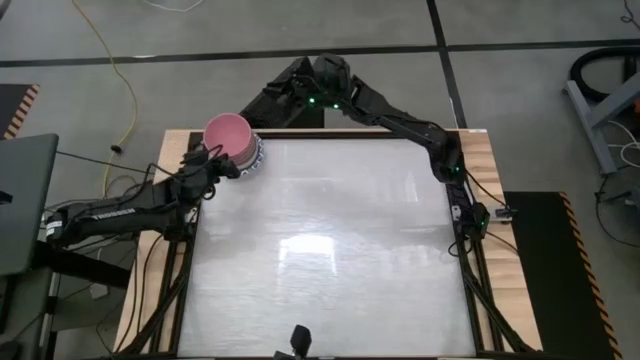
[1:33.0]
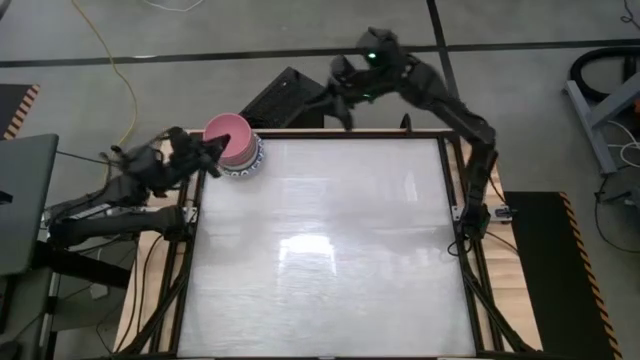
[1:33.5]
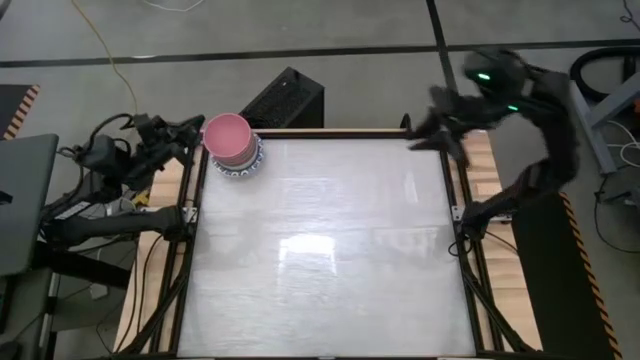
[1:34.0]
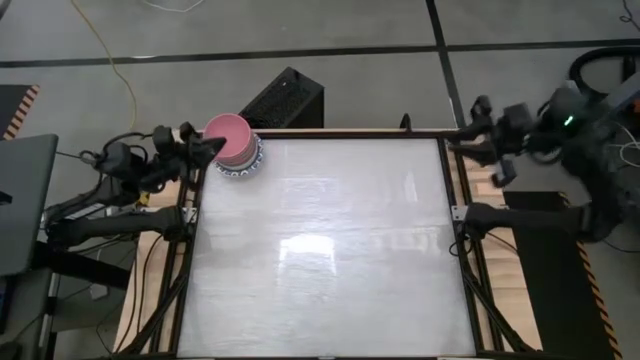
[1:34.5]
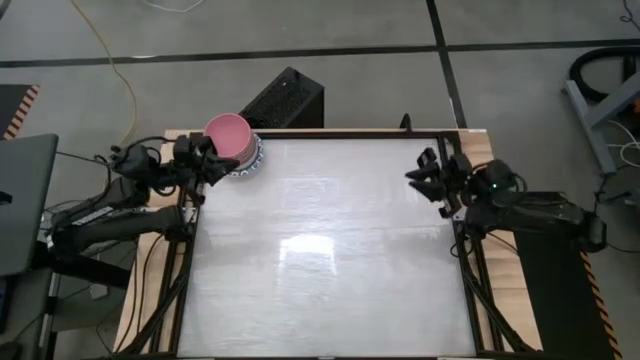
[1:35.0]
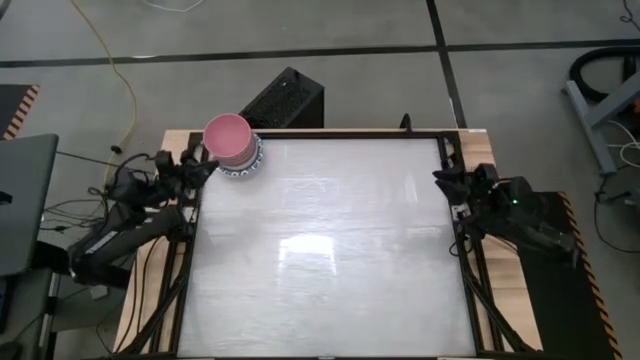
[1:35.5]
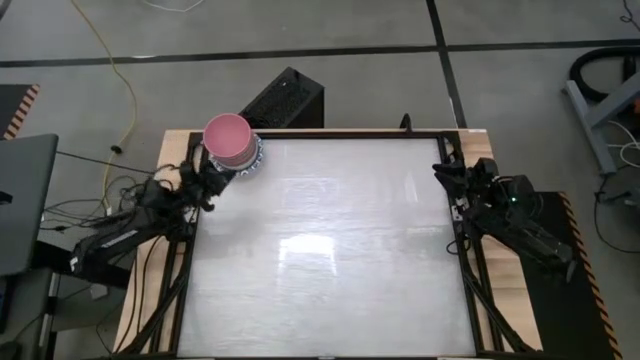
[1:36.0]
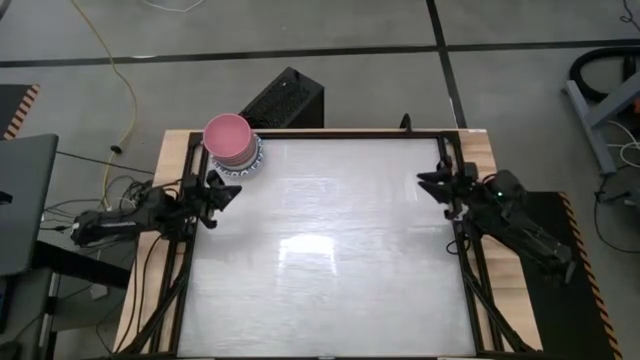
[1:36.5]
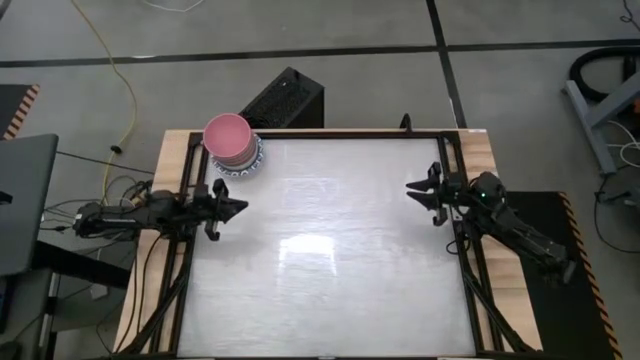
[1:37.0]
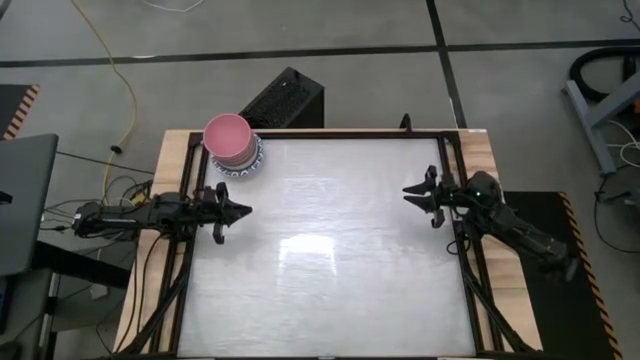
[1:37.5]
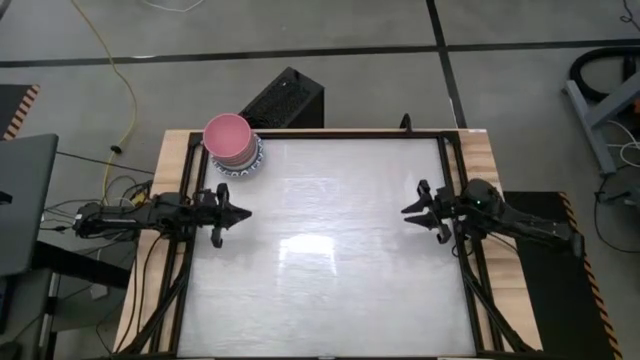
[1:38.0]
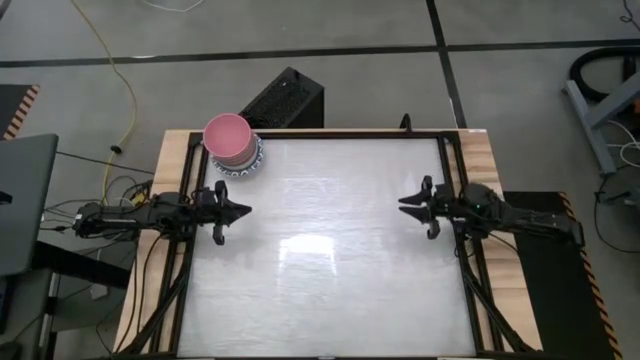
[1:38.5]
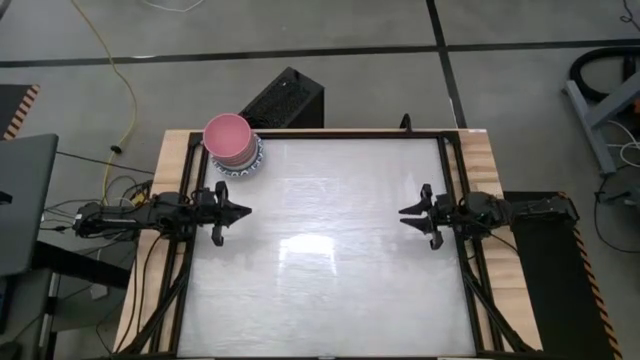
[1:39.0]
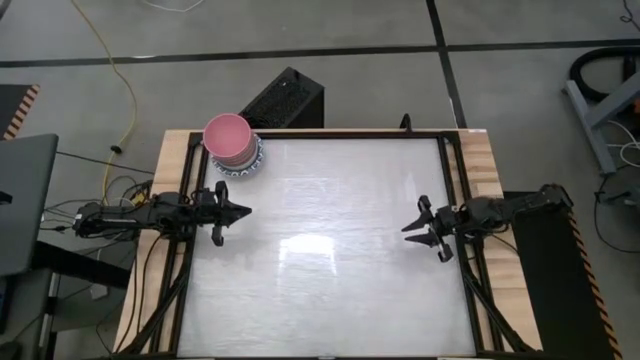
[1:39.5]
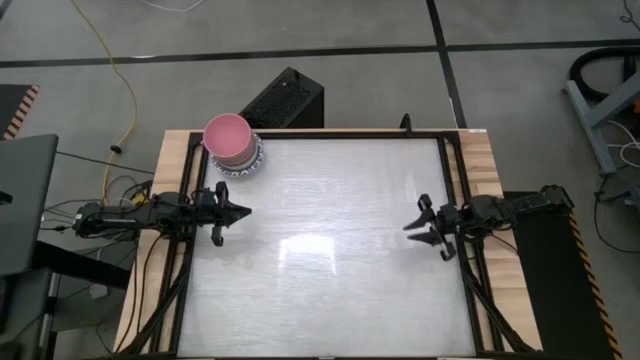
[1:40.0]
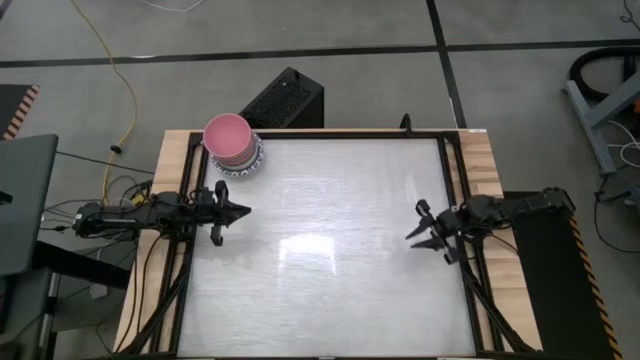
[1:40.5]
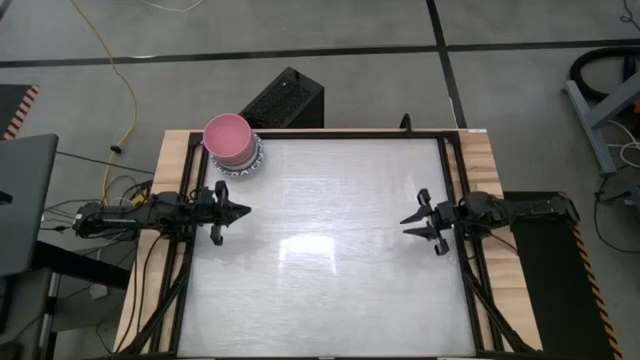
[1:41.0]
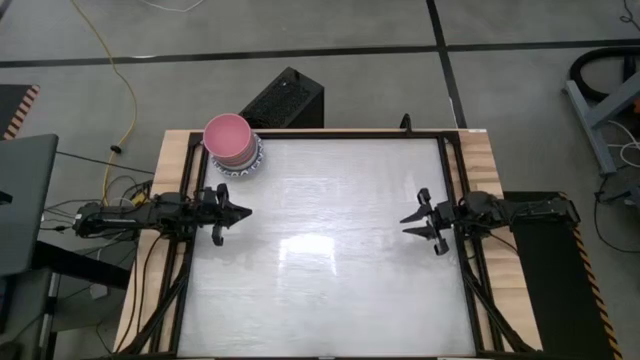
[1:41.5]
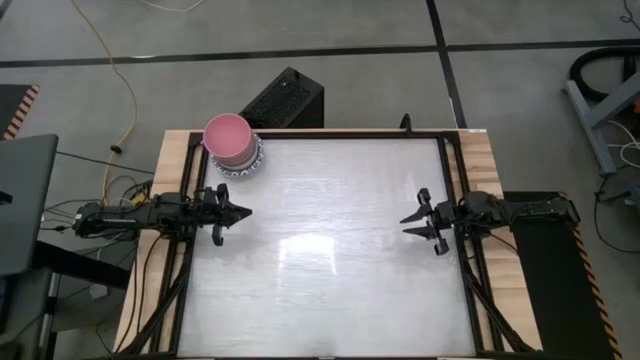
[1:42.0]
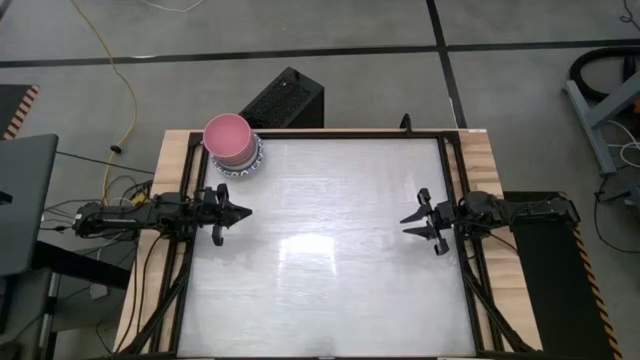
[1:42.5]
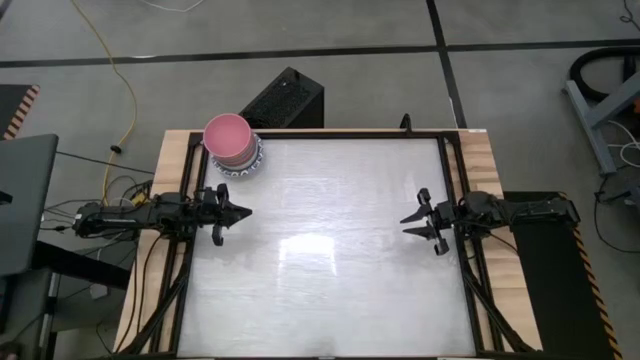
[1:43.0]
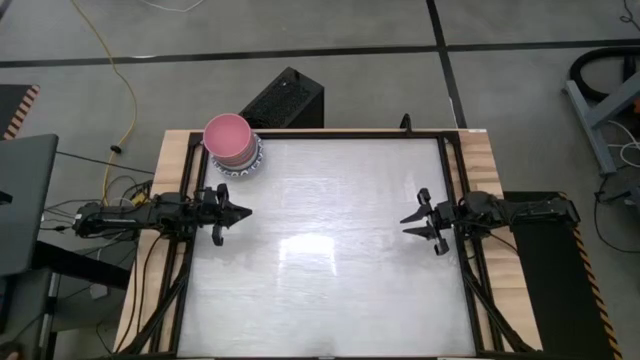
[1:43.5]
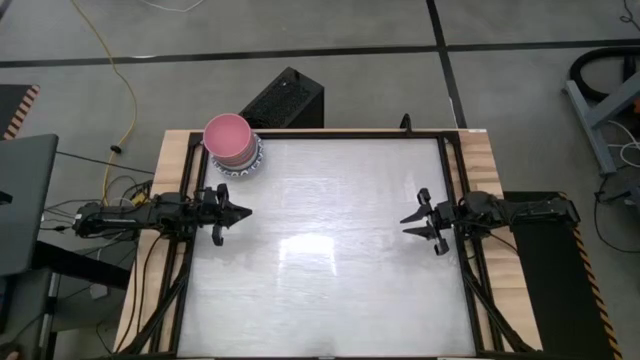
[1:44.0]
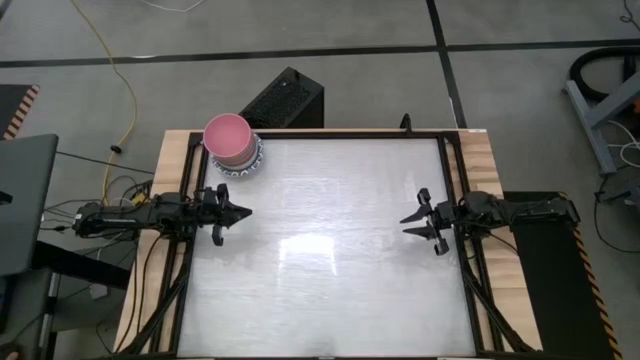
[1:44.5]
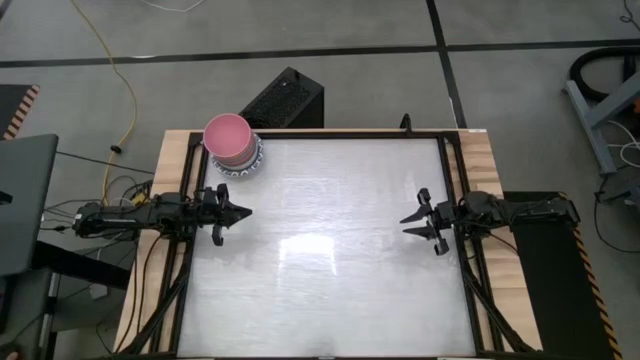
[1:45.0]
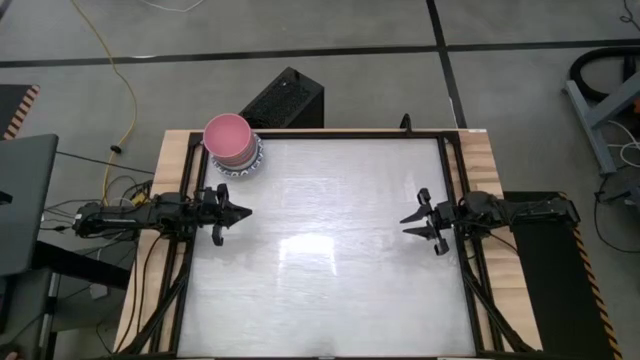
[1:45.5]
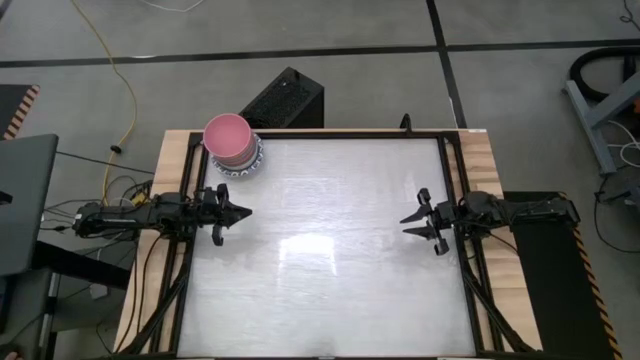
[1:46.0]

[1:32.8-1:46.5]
Return To Home Position

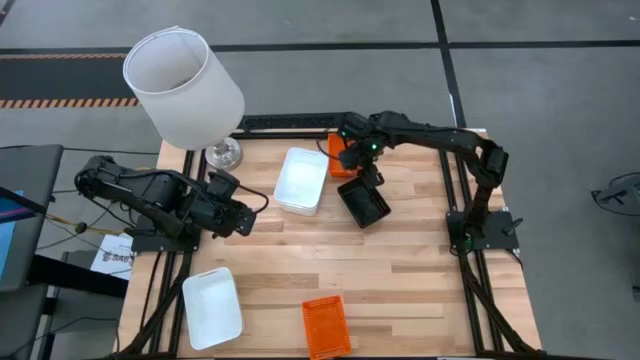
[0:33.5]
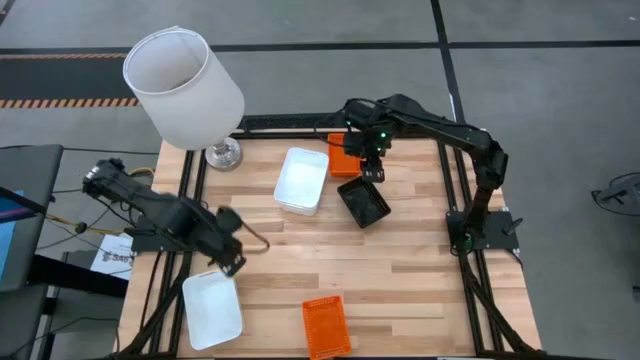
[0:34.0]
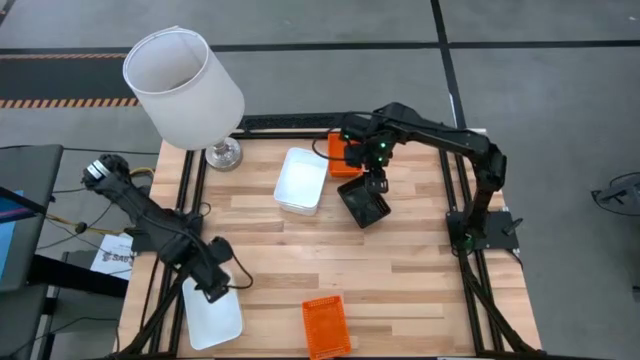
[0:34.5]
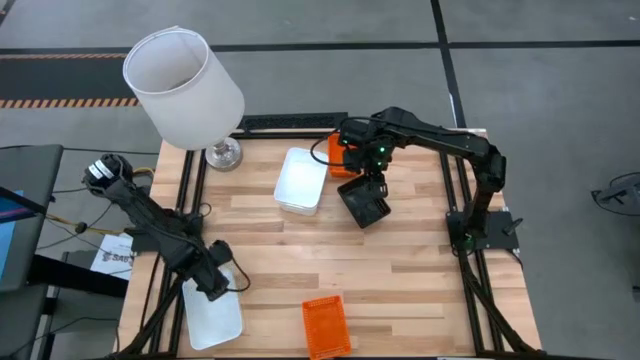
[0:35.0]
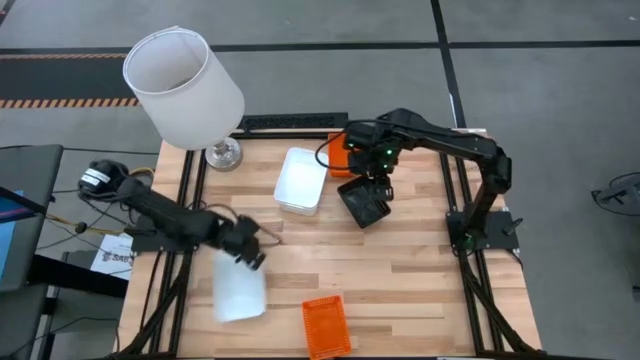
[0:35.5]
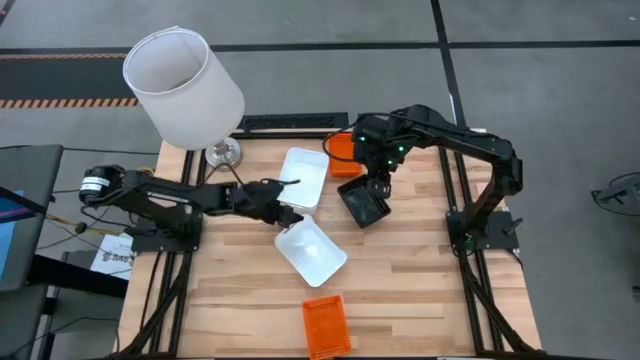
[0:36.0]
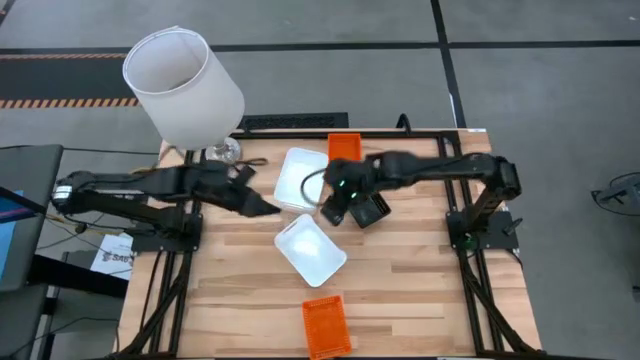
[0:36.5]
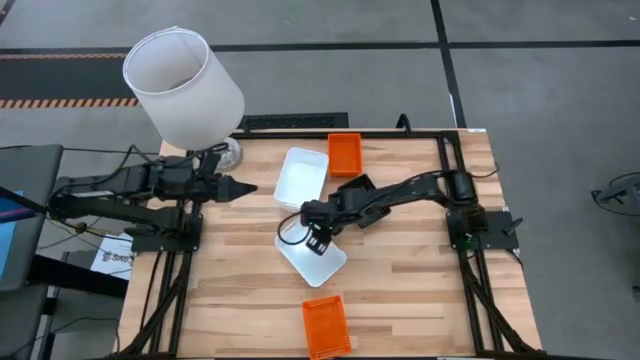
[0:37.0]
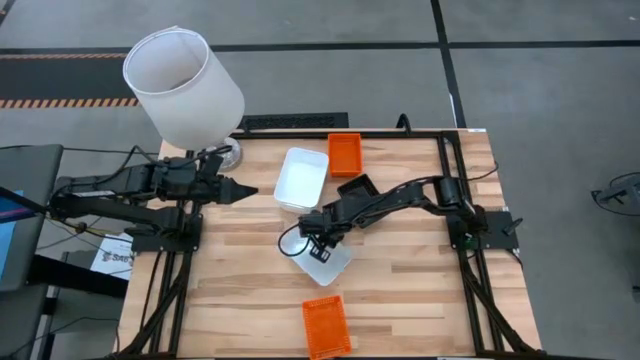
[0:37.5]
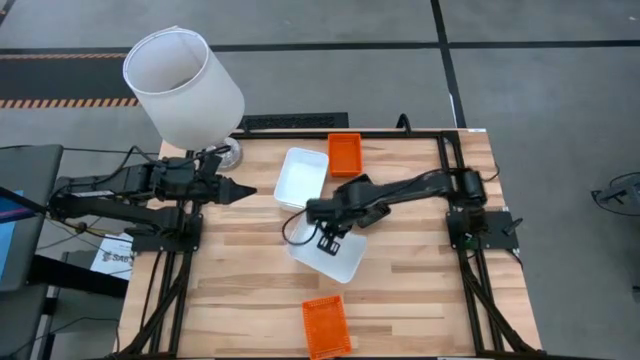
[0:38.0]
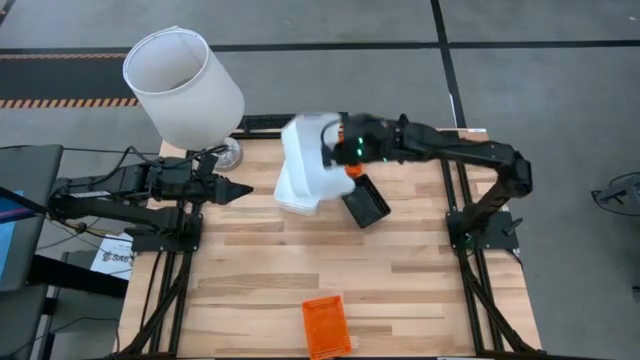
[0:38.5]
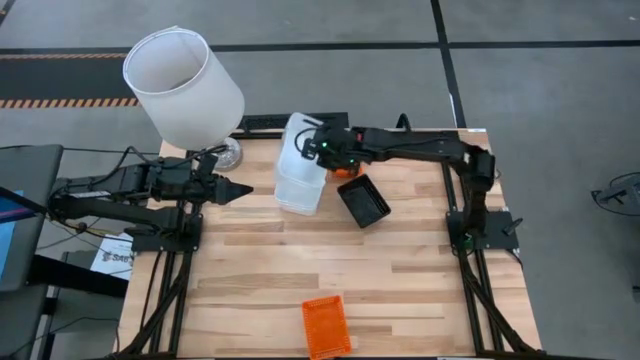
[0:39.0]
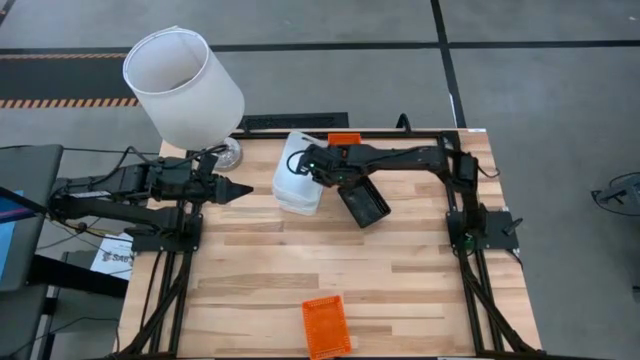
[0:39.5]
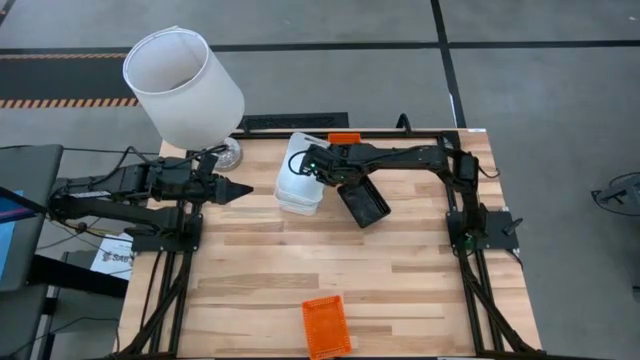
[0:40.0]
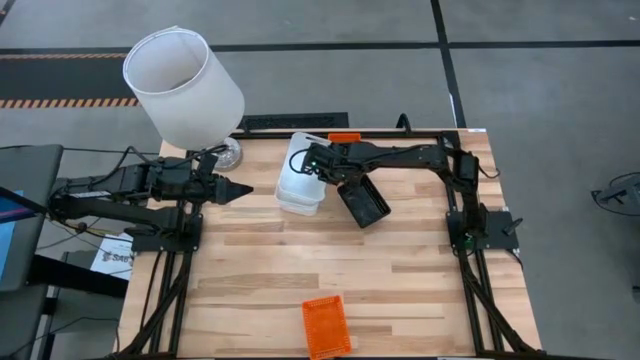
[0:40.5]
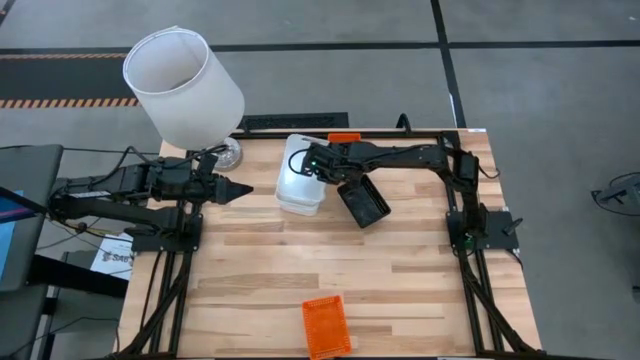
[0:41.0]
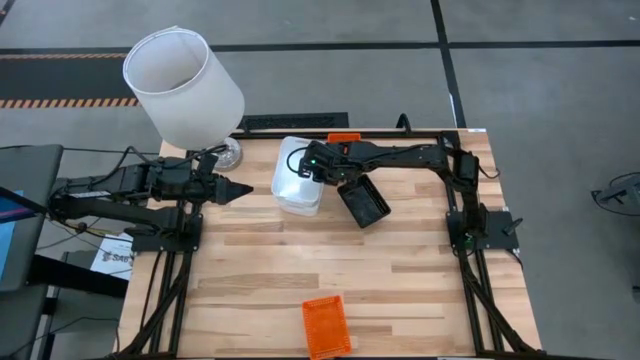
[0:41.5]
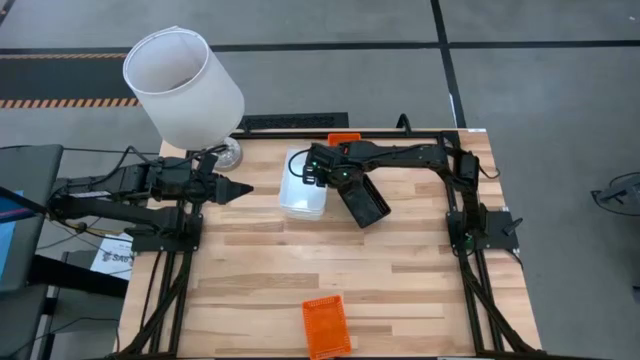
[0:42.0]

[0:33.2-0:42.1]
Stack the white bin on the top white bin
